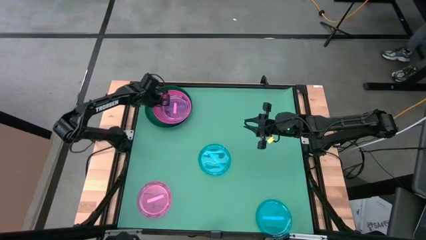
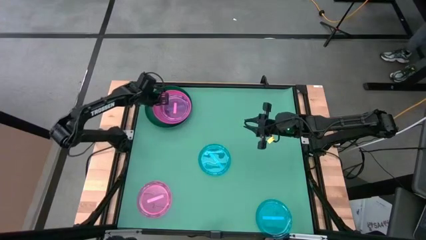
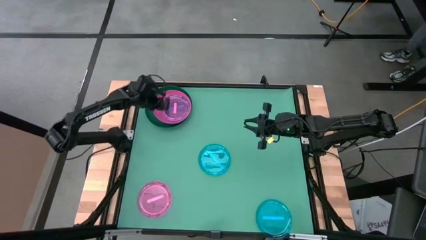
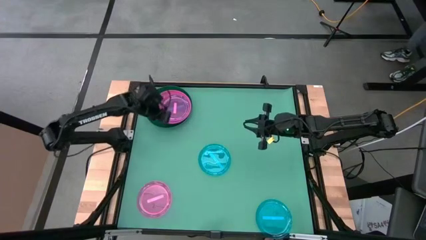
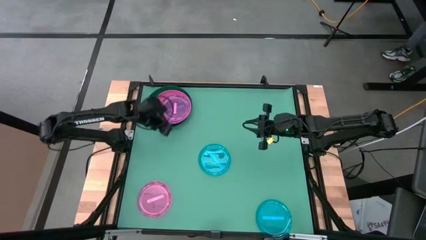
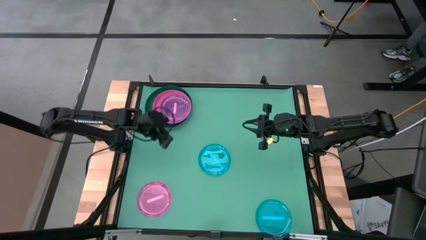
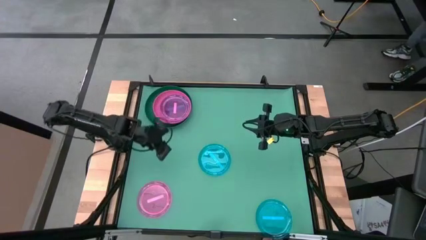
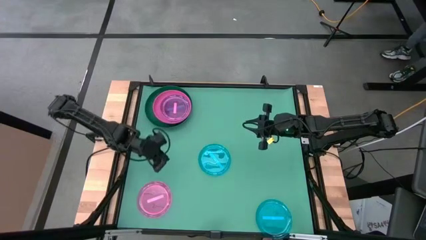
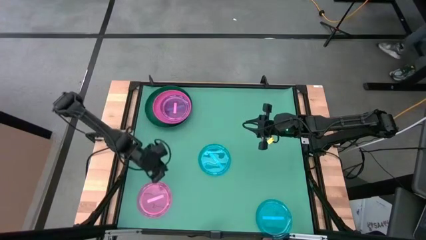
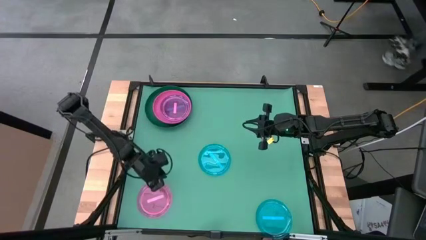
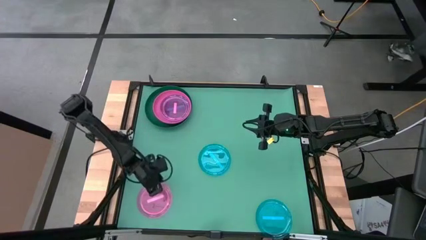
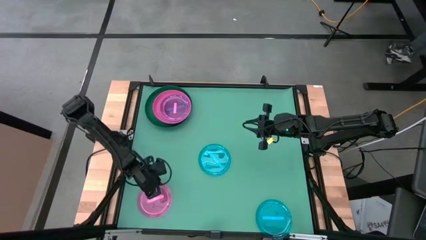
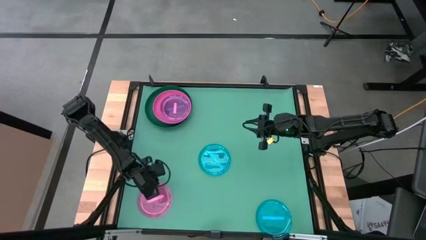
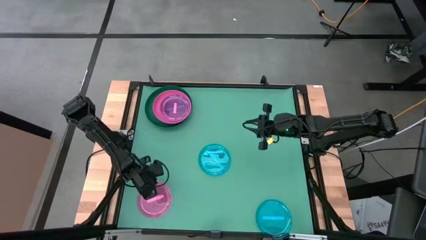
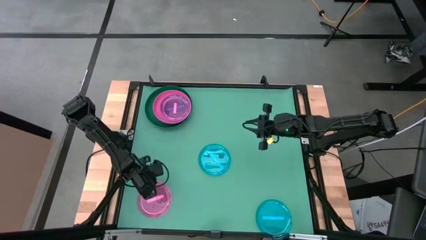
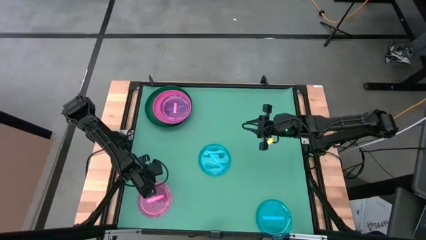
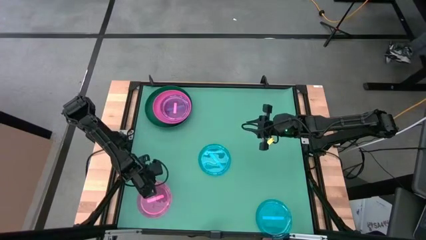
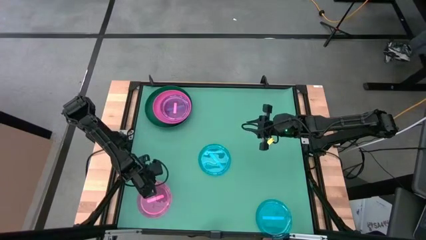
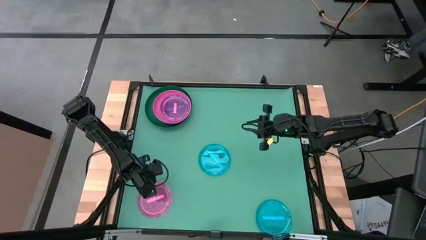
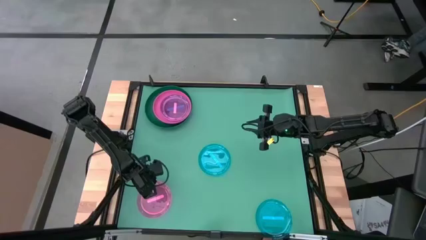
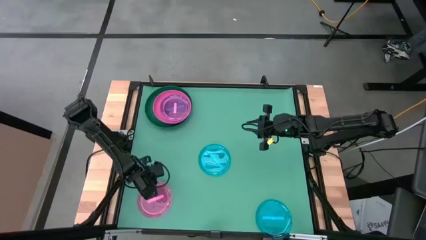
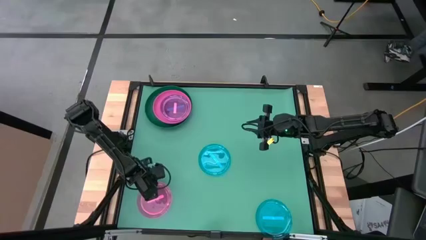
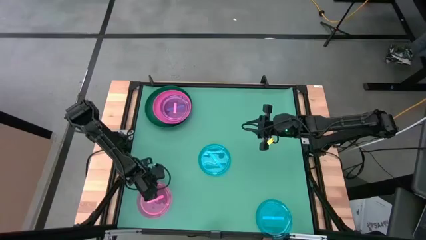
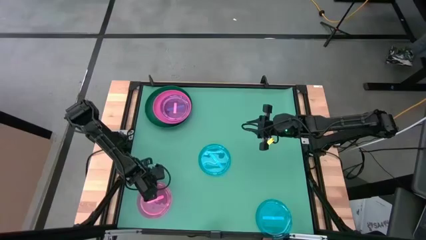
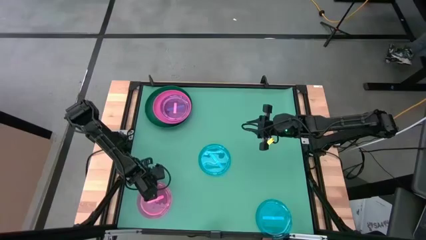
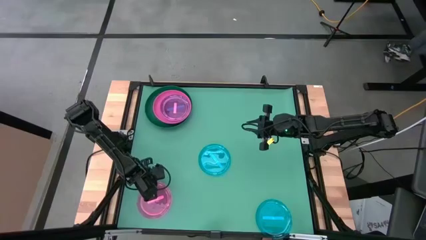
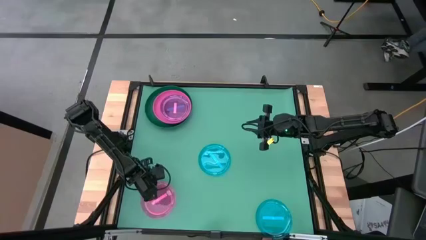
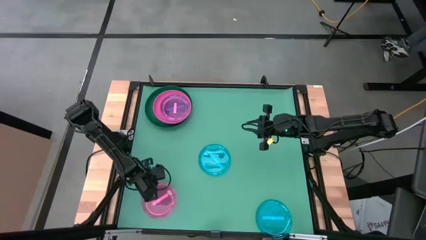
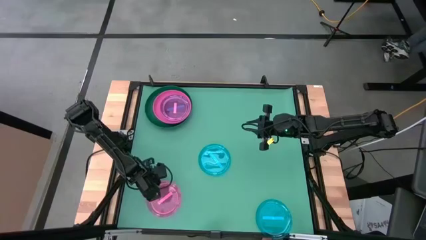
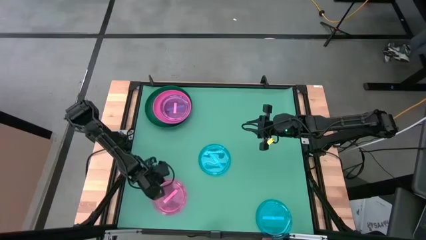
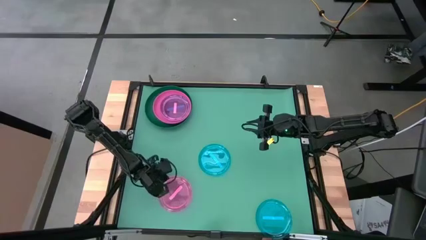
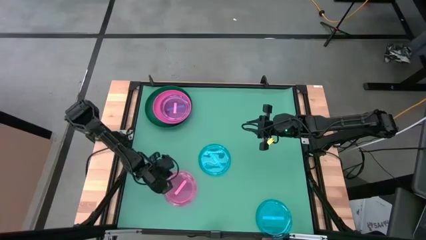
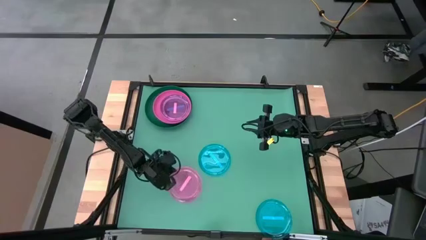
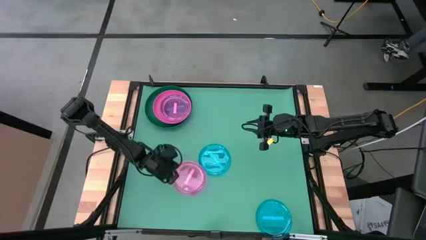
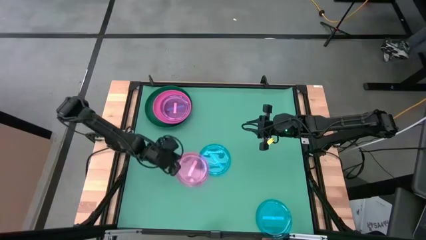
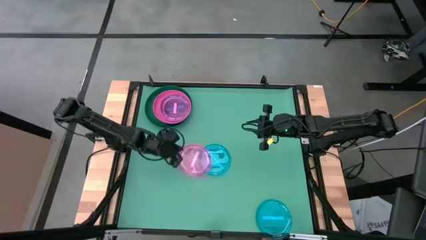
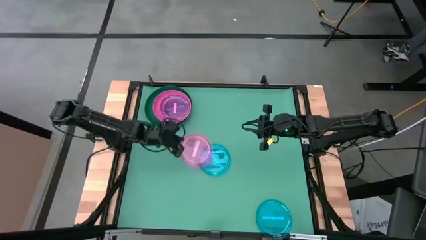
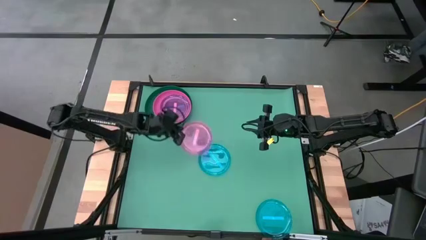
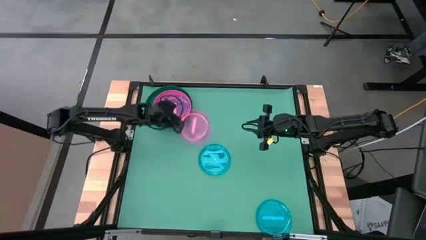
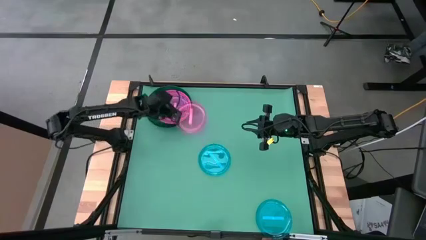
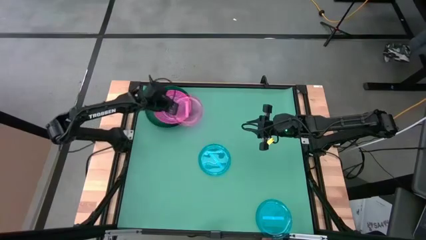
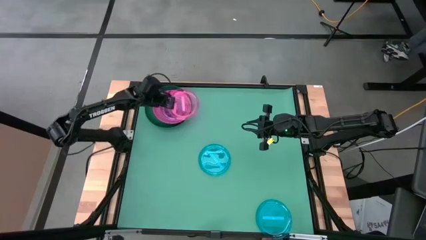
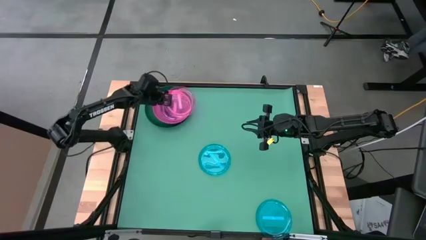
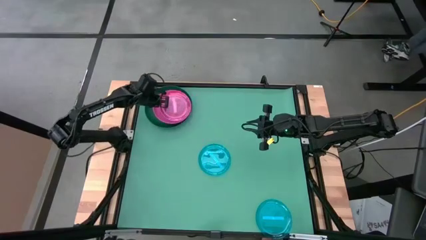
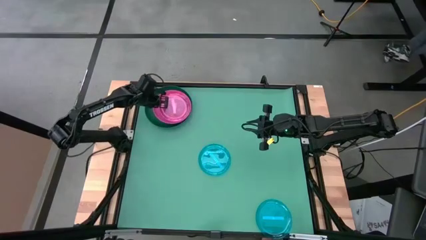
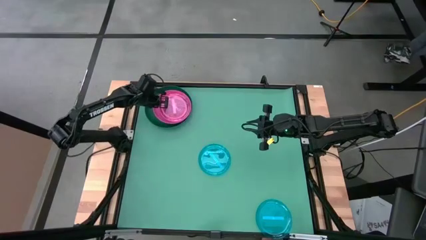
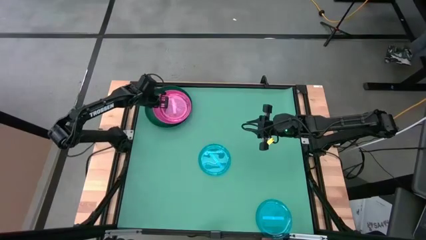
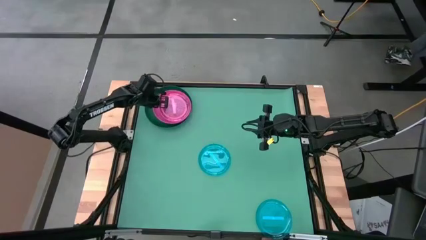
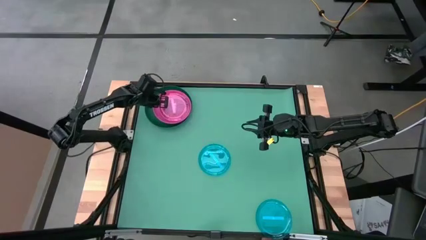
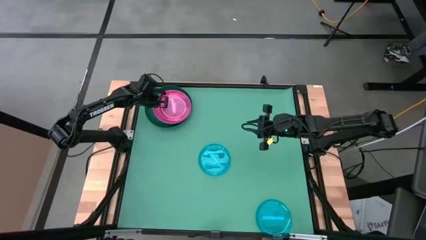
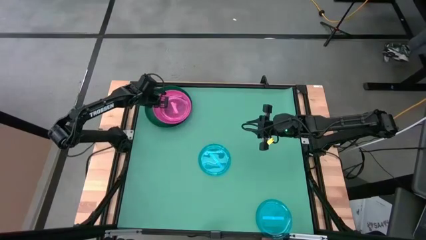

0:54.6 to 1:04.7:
Task: Stack plastic plates
Stack the light pink plate on top of the light pink plate

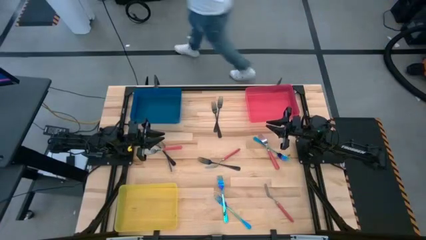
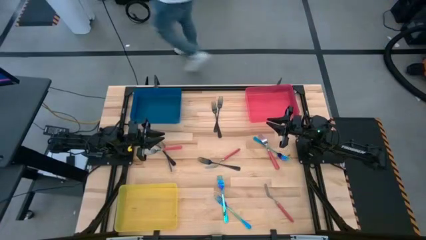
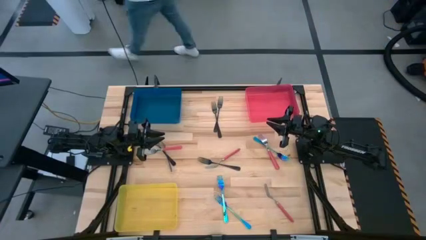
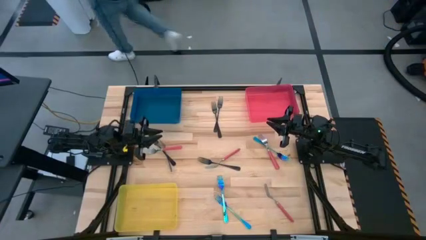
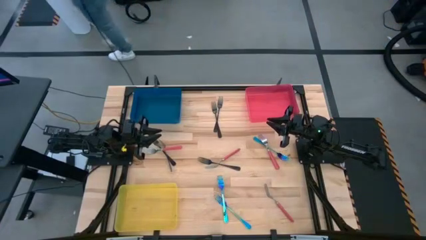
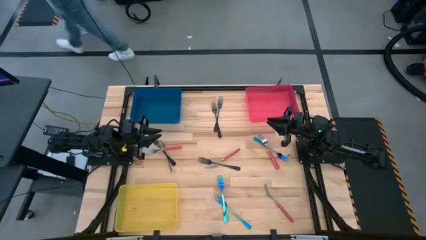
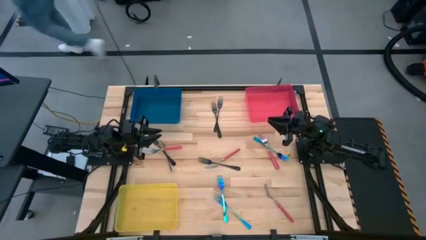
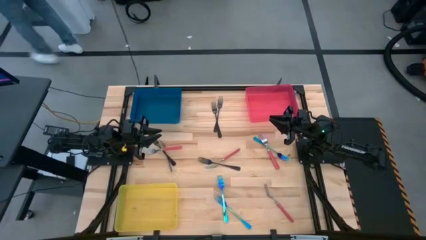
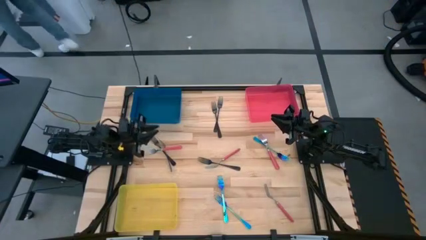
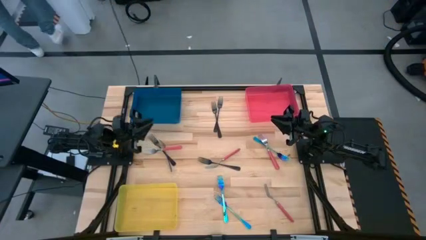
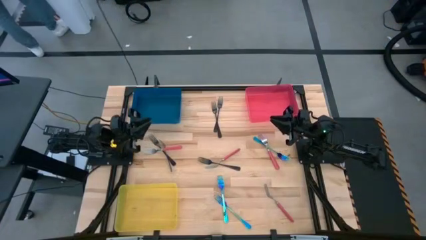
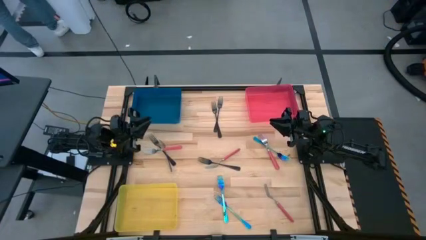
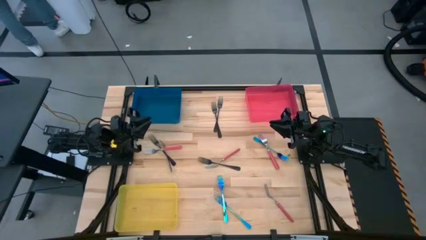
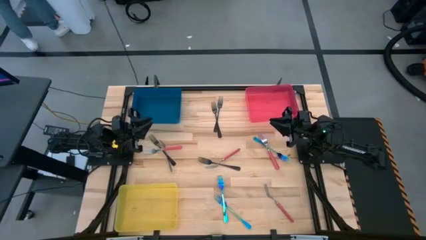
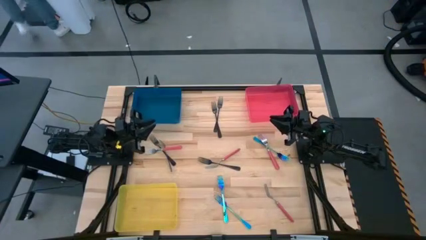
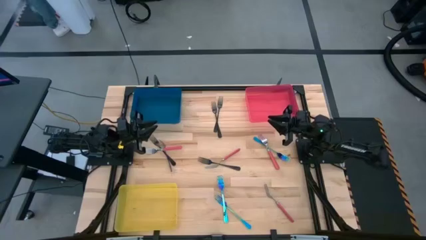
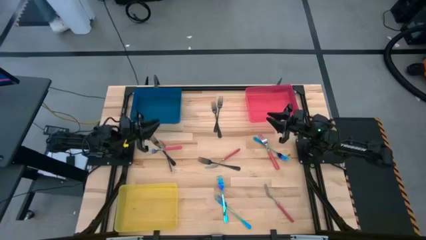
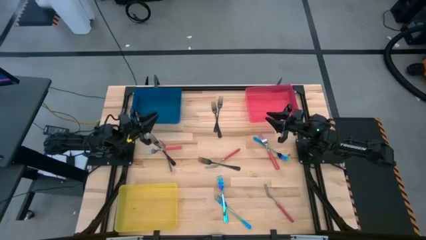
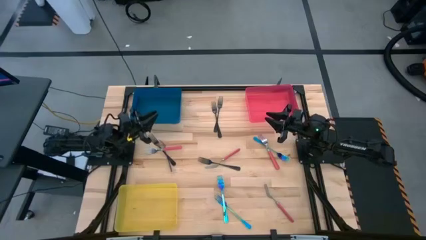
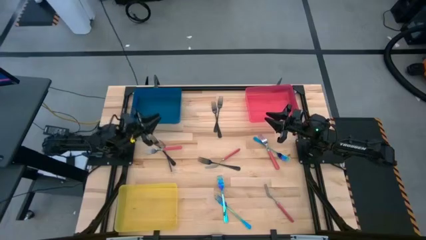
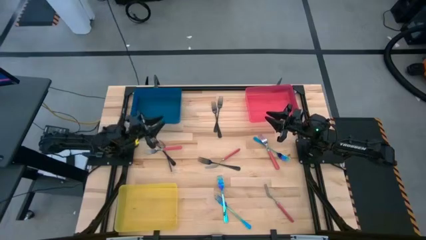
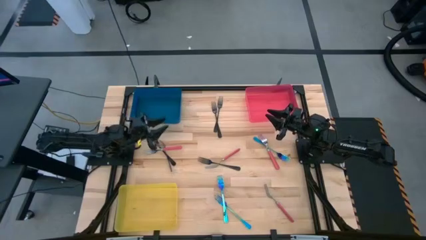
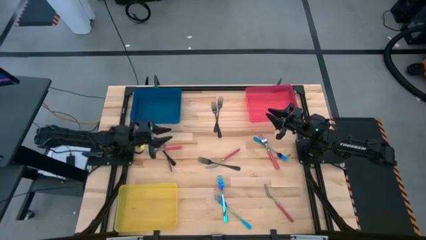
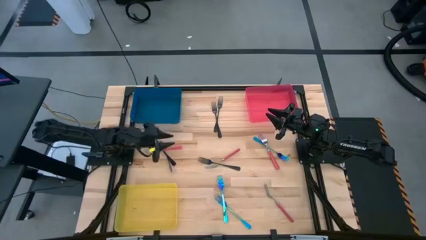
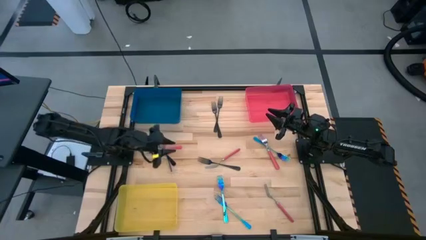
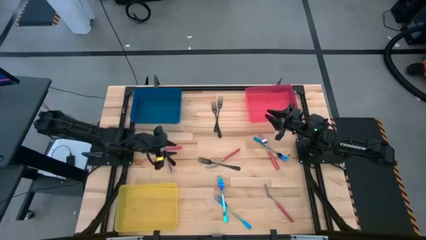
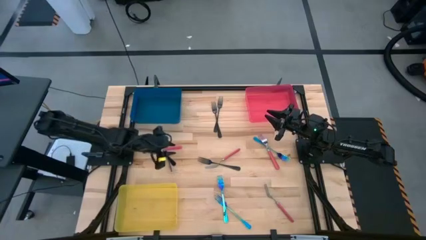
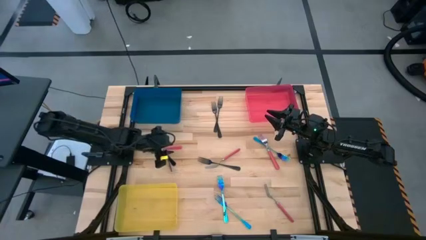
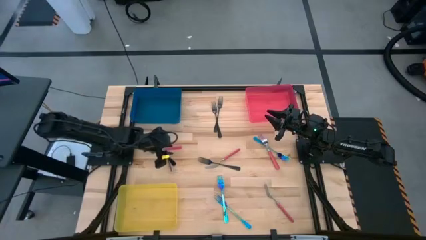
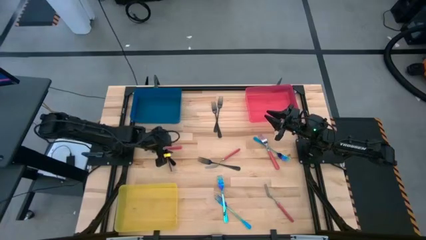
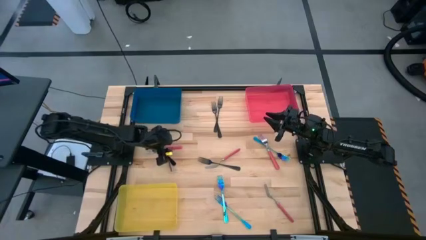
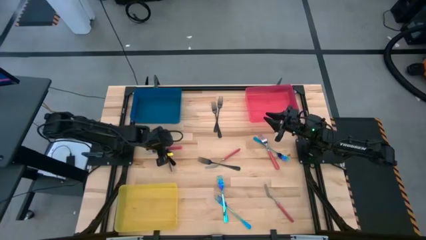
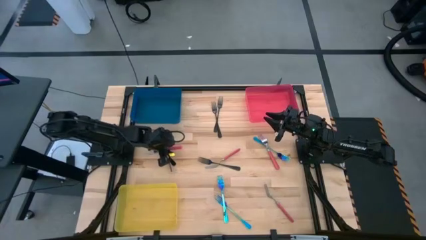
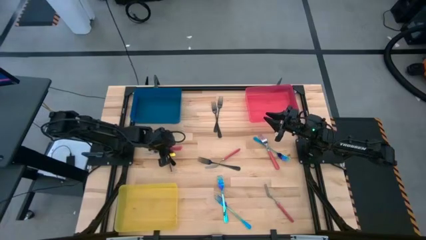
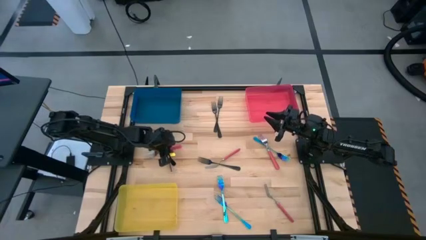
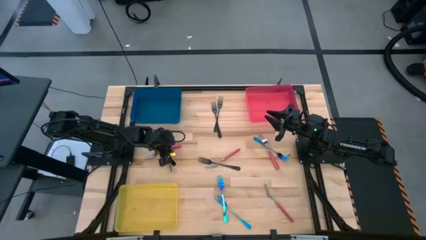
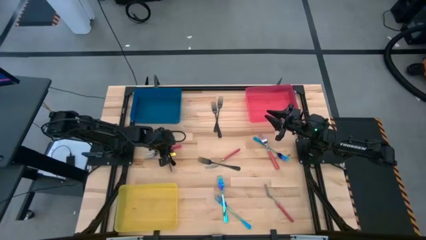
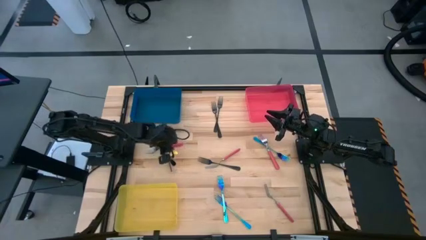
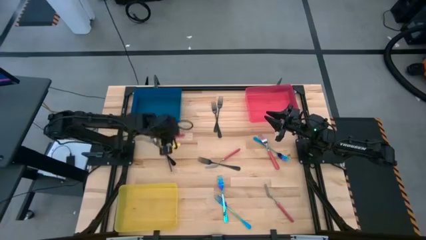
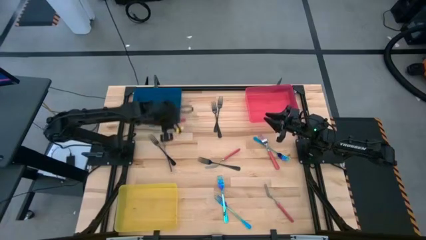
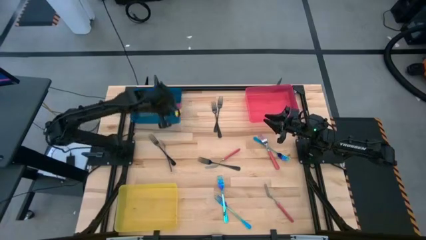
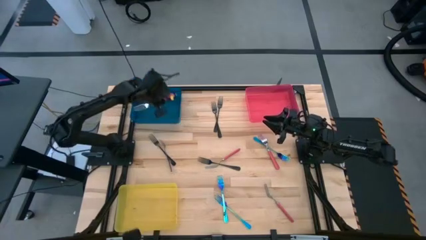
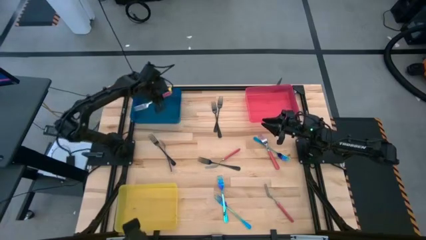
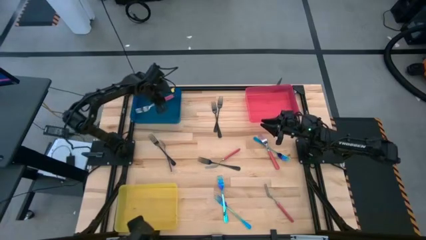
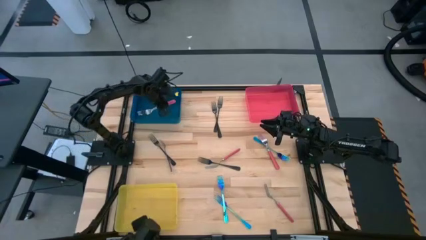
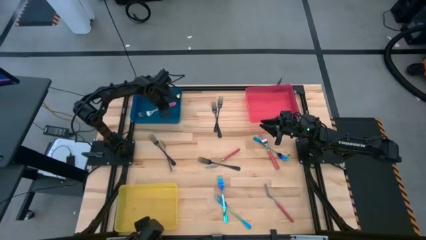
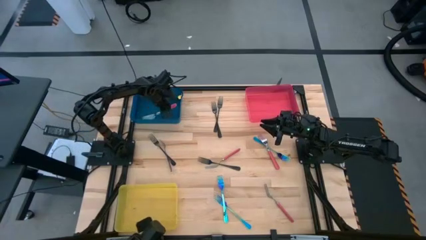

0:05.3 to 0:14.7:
Task: Sort silverware by color (type)
Put the red fork into the blue bin
